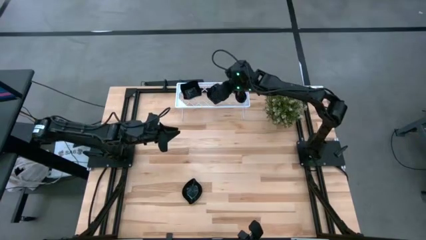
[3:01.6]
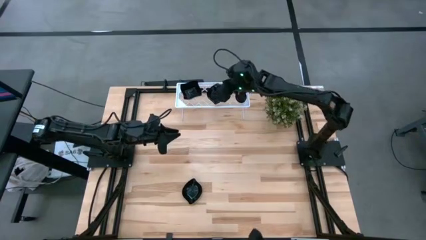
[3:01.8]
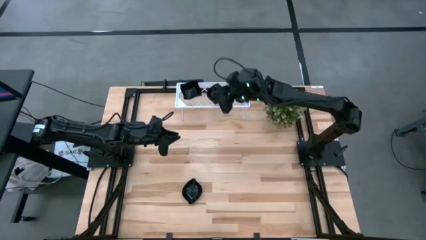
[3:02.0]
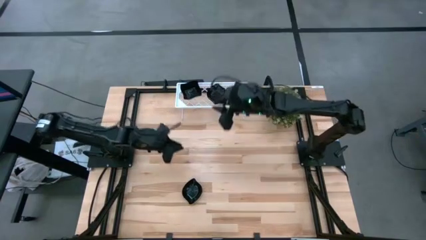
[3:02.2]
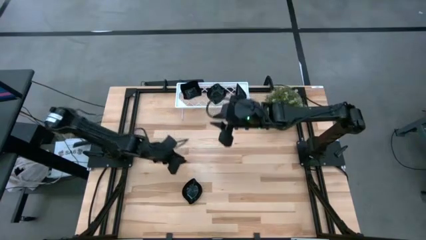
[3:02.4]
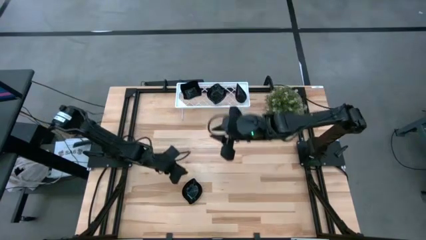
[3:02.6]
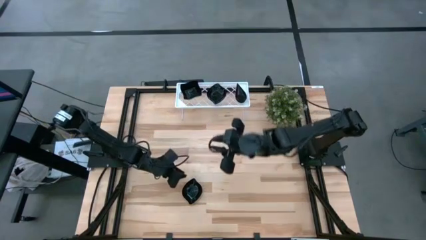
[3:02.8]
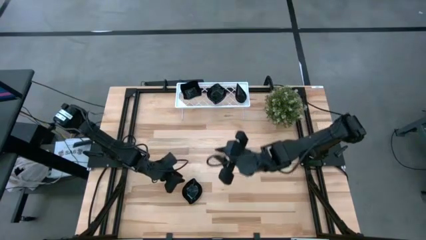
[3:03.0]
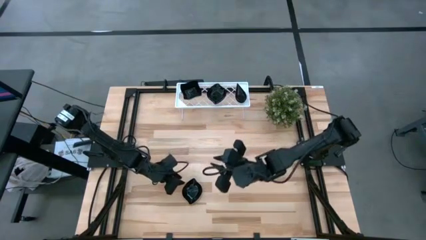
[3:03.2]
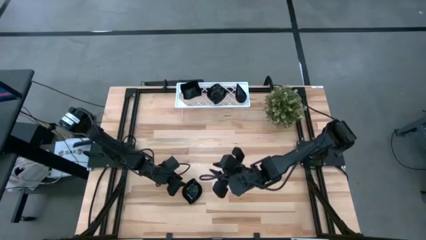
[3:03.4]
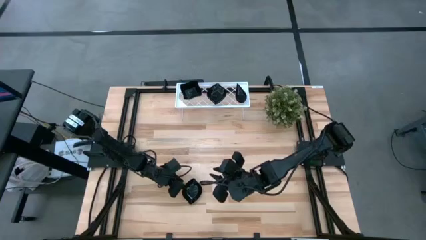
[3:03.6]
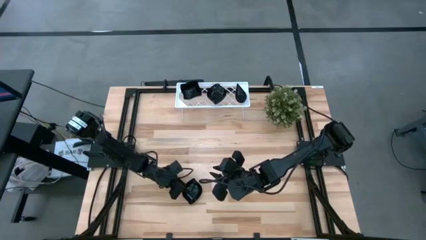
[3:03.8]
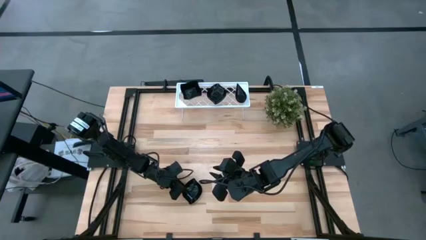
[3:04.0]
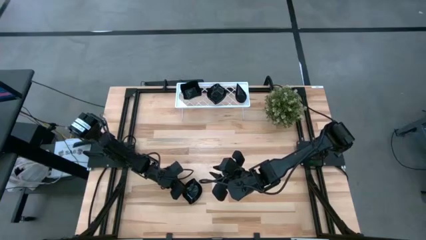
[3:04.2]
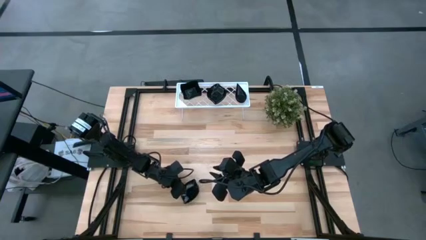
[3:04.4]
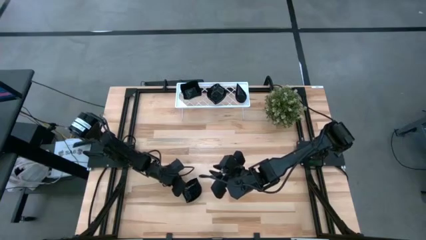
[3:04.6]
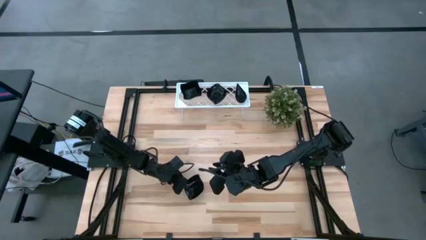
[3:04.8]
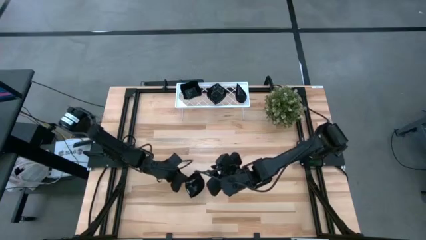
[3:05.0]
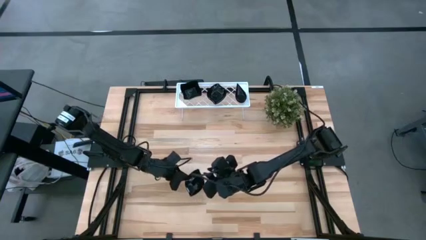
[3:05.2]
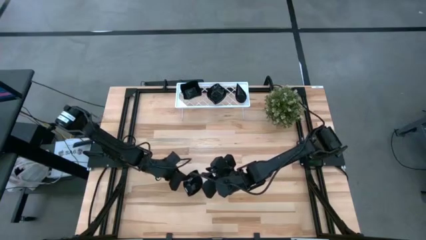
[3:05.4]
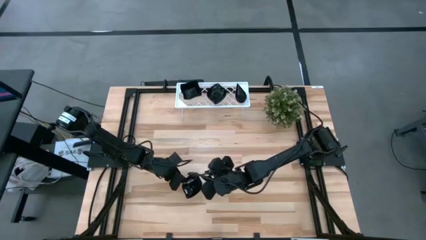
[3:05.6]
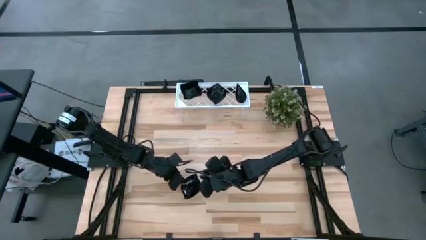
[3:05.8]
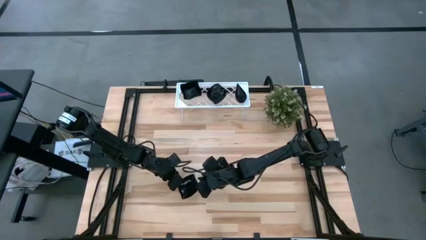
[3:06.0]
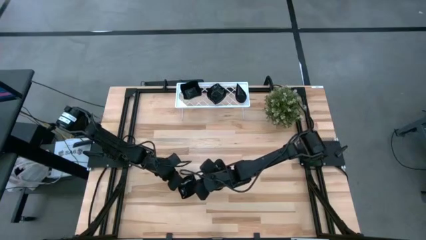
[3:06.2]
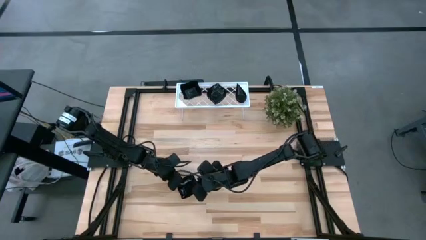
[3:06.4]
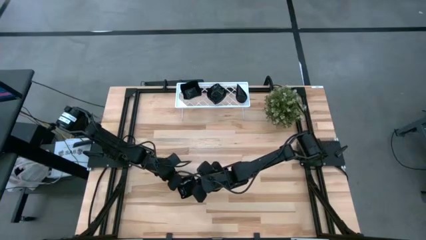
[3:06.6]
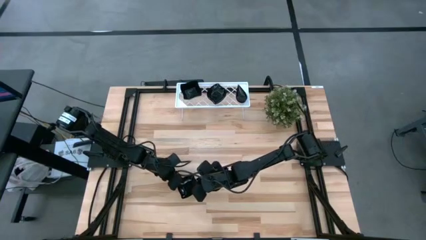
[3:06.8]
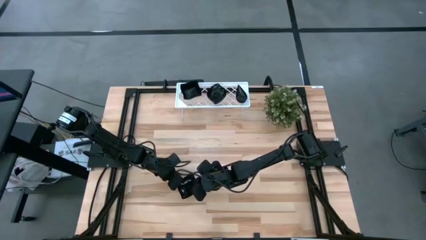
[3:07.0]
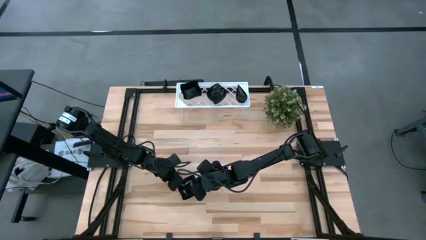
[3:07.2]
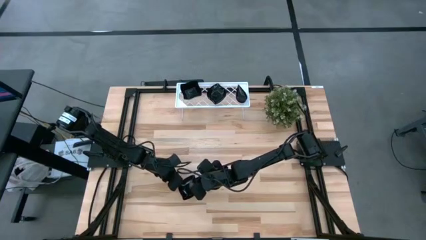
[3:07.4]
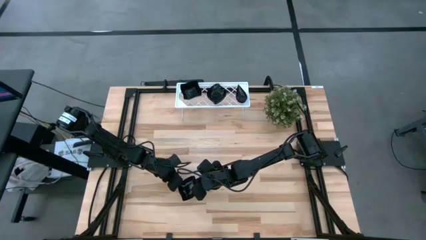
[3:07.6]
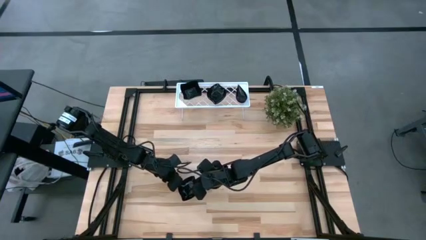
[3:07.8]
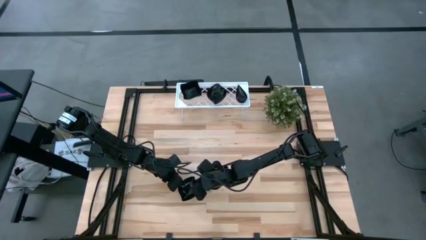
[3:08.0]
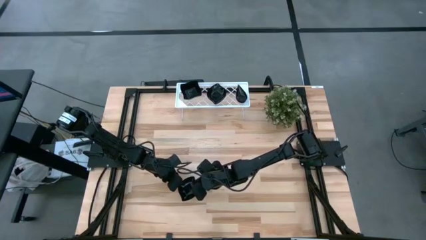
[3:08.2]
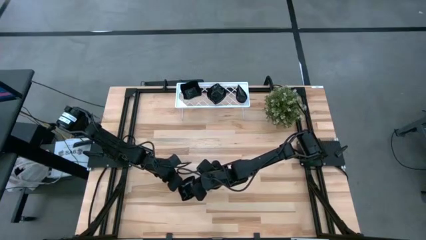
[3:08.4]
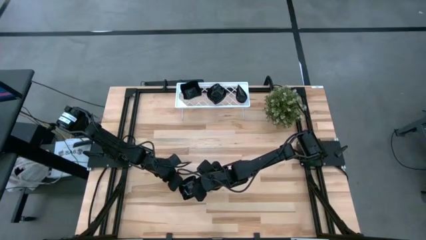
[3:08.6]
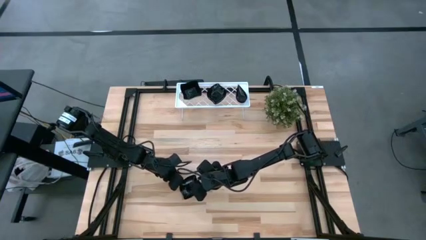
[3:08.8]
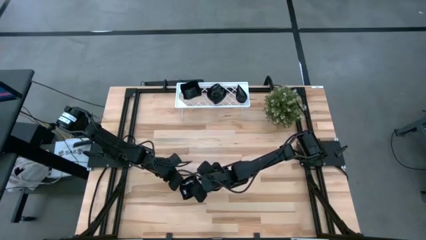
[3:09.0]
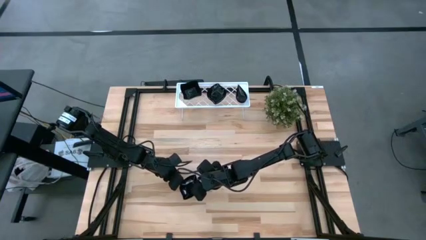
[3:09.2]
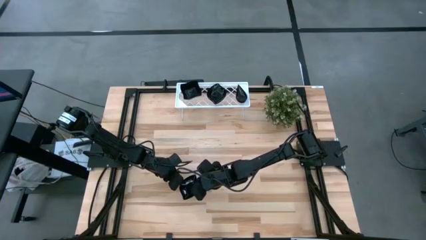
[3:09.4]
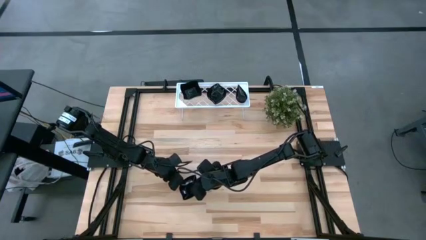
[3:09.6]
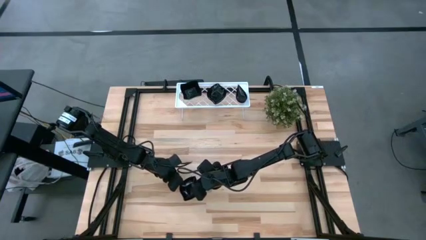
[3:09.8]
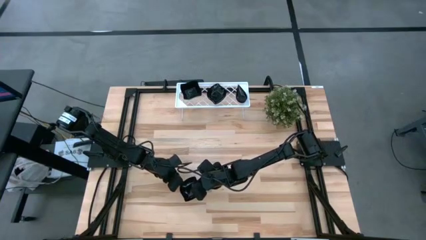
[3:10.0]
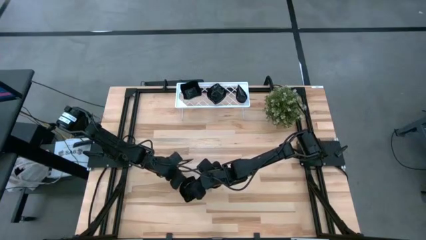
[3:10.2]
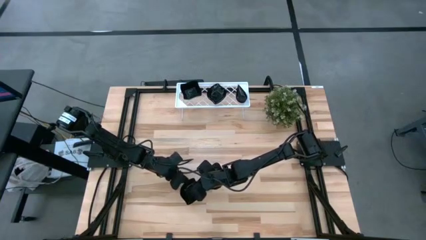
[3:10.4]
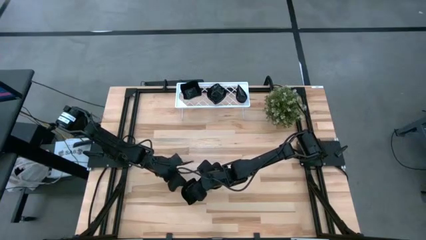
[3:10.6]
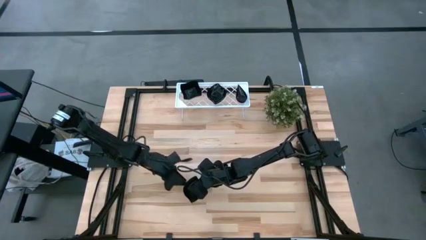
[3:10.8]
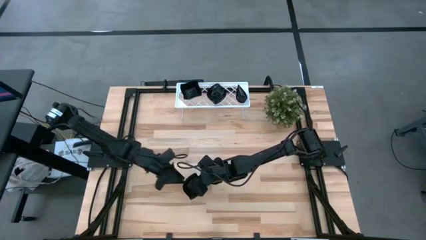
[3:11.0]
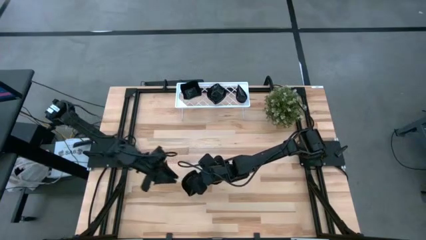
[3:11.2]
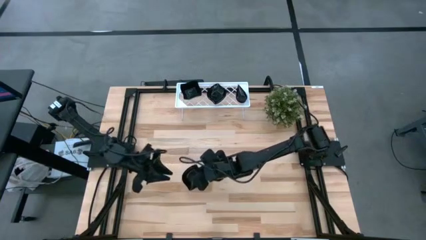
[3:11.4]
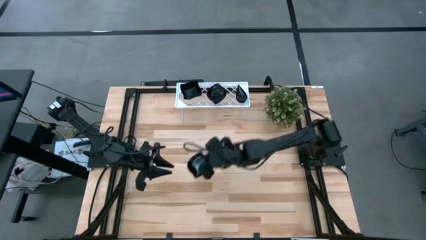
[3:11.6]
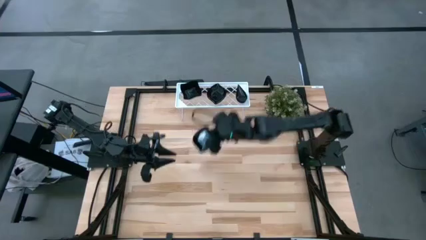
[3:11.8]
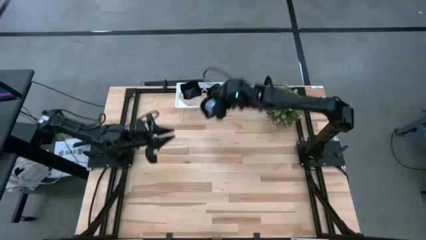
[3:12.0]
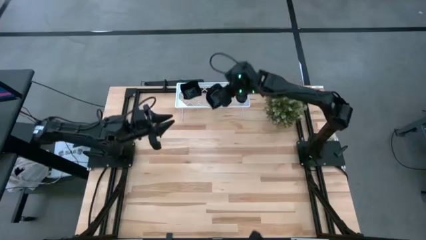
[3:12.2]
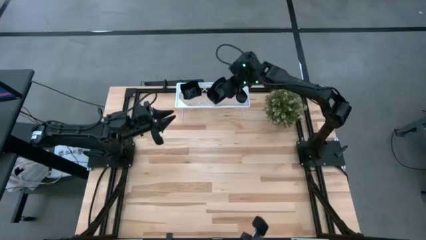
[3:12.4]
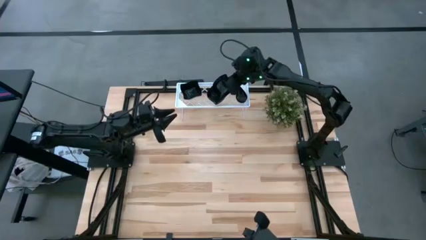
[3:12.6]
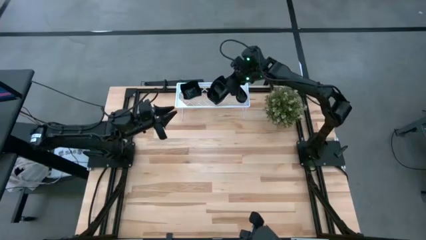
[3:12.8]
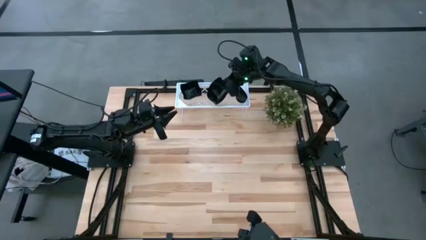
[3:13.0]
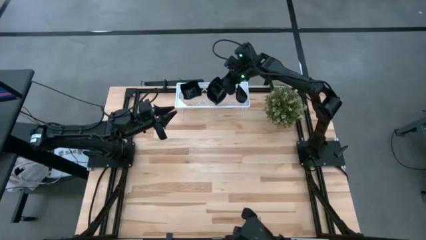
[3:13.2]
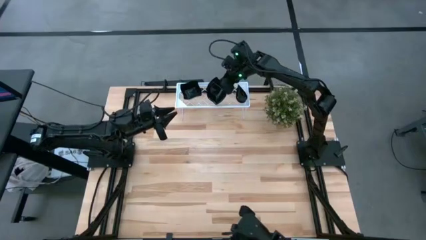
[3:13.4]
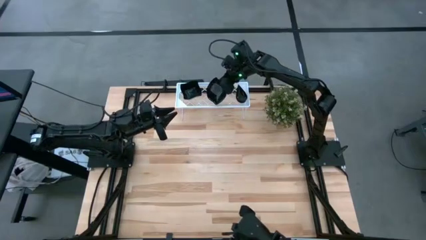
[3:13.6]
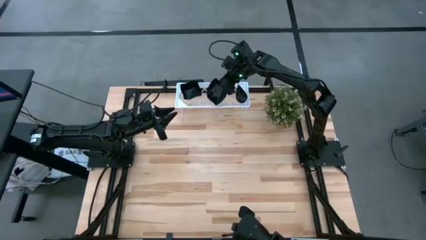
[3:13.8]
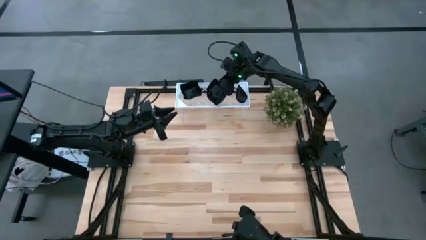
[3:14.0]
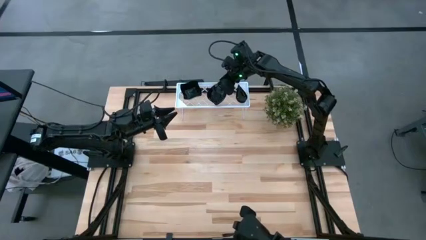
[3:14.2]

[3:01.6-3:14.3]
Task: Pick & Place Mini shaped plates
Stack the leaf-shaped plate on top of the leaf-shaped plate on the shelf

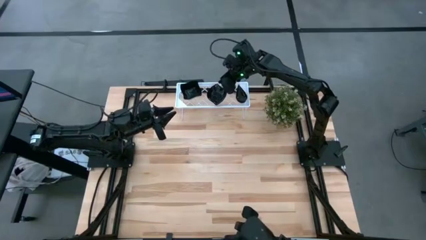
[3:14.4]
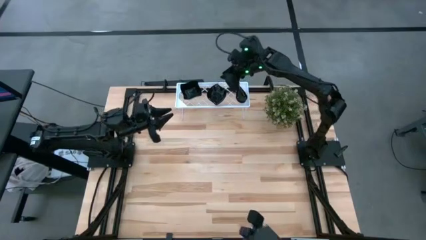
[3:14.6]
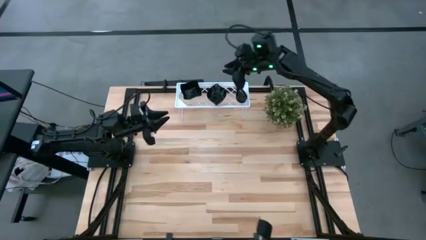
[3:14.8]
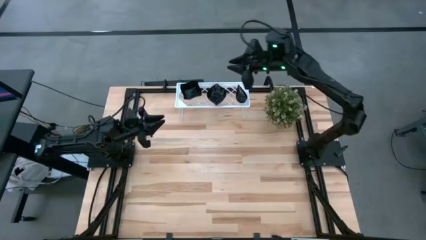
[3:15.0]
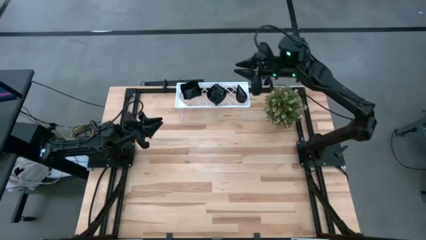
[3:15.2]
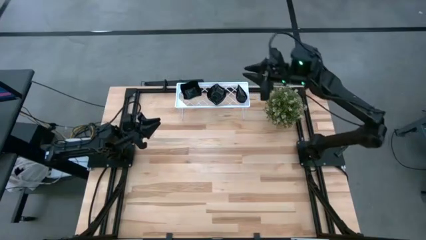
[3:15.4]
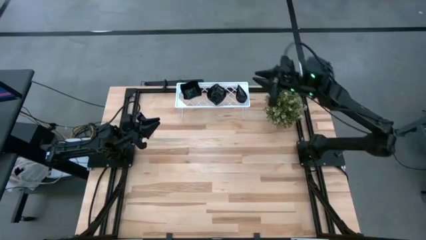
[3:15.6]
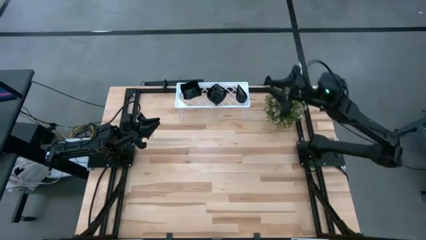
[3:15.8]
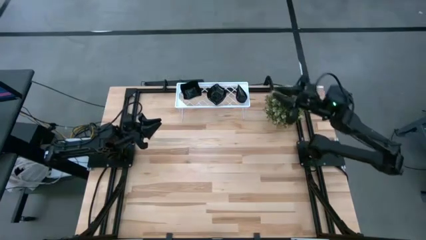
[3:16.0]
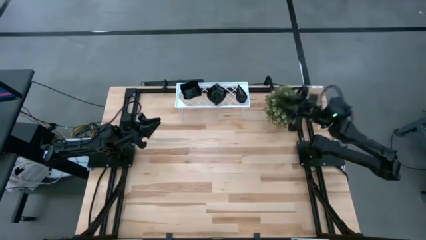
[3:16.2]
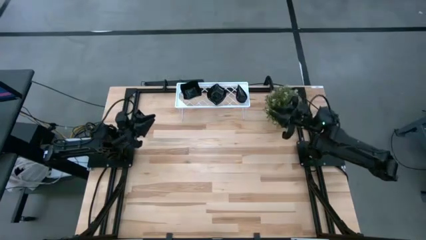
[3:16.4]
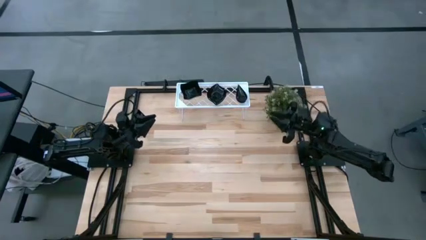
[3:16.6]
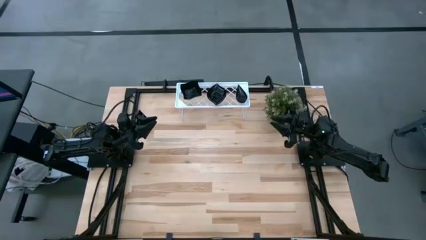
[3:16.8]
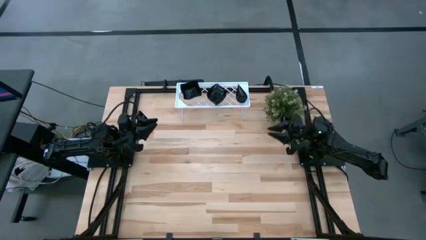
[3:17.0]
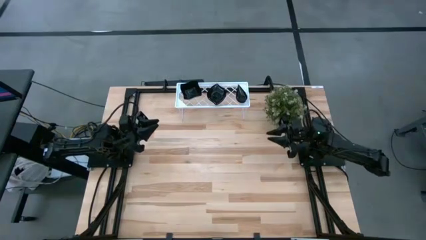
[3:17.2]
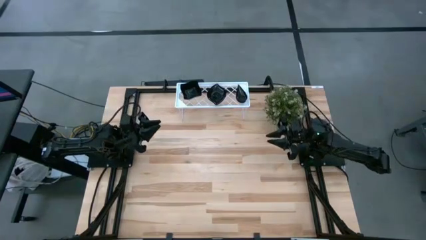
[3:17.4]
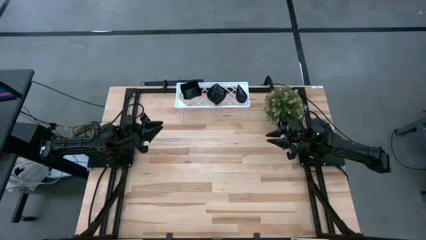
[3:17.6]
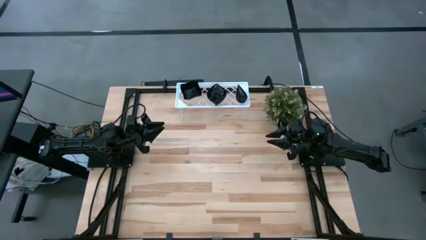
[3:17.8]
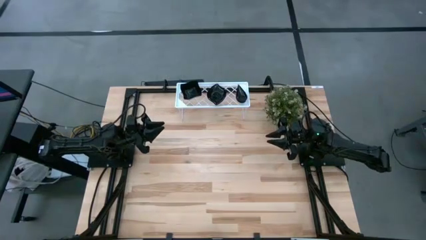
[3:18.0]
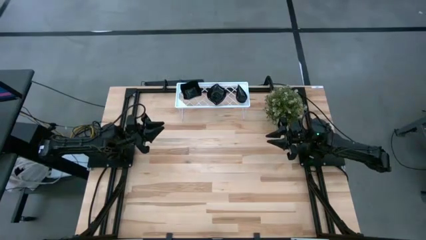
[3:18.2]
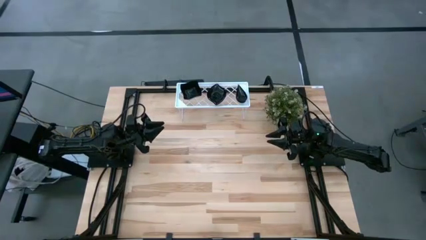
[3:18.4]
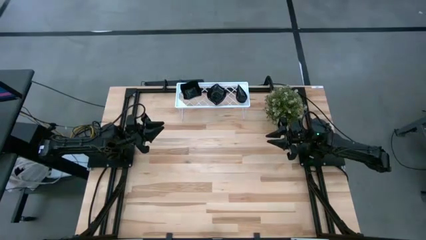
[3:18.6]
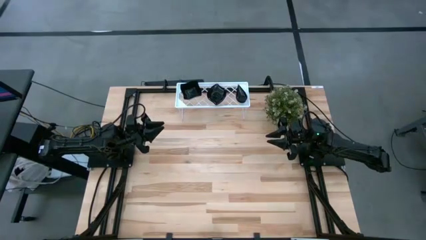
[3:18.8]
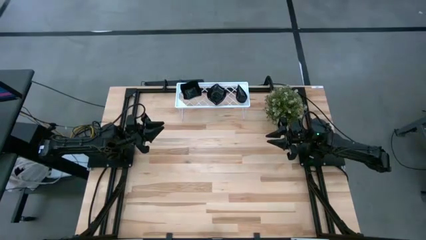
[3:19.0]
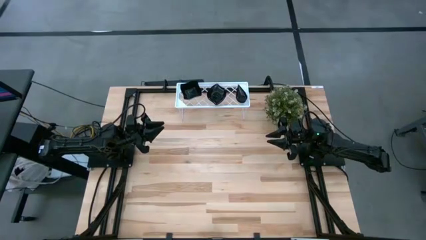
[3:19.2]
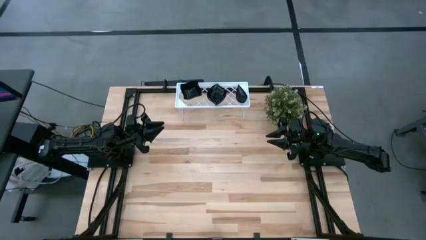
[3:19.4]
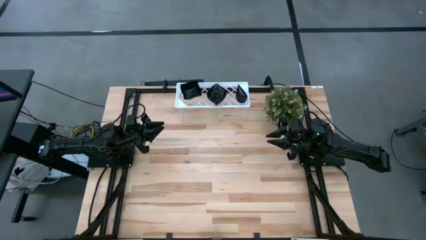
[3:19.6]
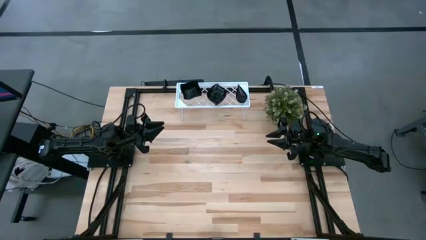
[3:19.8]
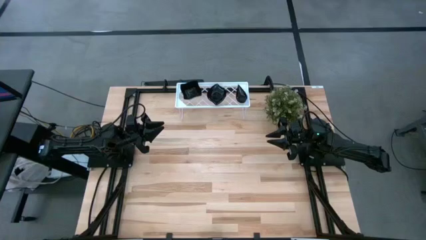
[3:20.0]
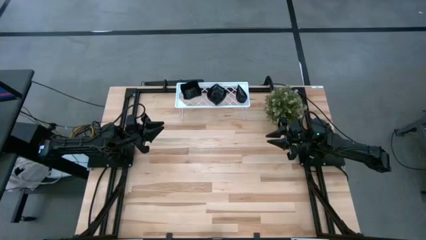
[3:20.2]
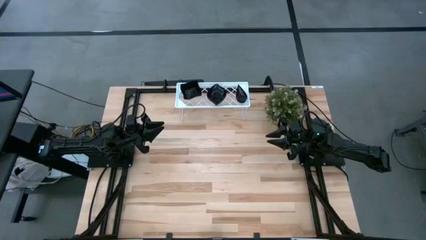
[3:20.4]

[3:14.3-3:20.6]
Return to Home Position
